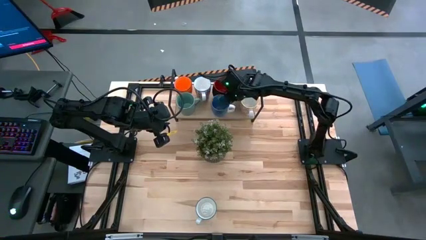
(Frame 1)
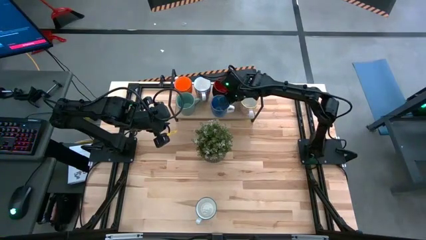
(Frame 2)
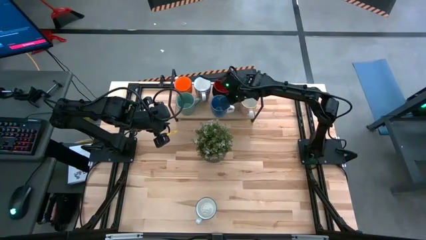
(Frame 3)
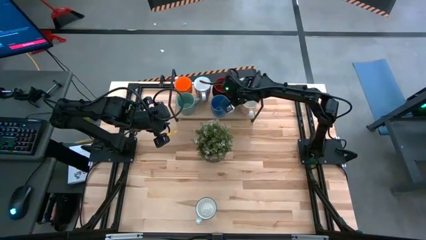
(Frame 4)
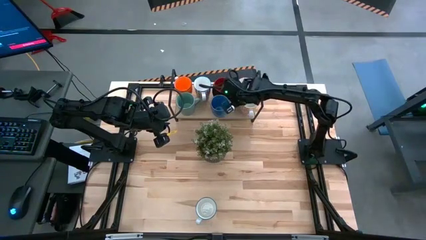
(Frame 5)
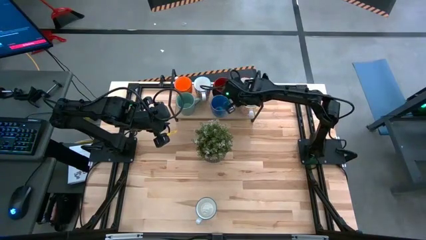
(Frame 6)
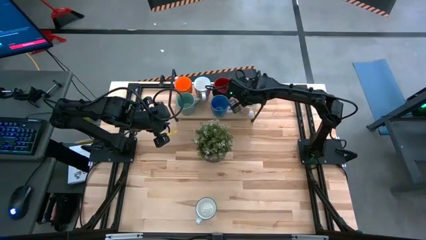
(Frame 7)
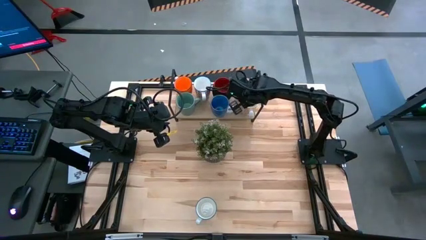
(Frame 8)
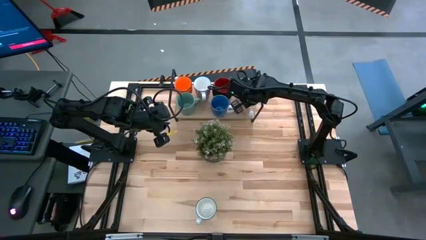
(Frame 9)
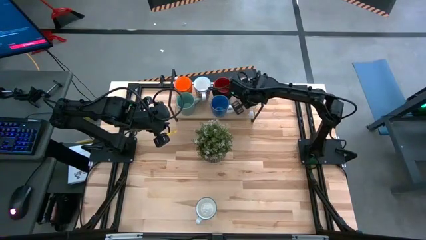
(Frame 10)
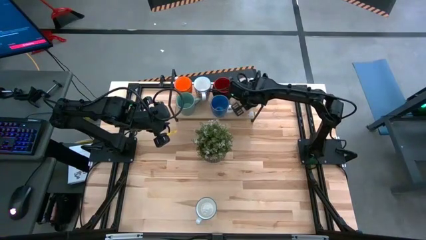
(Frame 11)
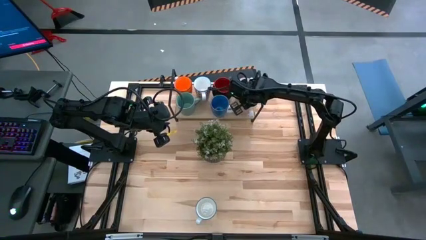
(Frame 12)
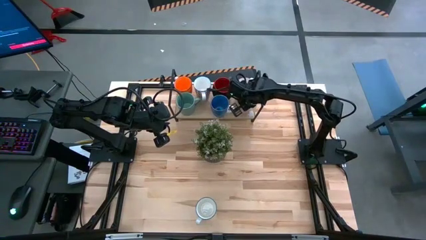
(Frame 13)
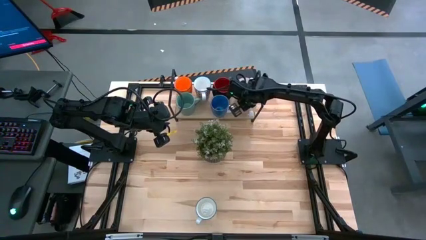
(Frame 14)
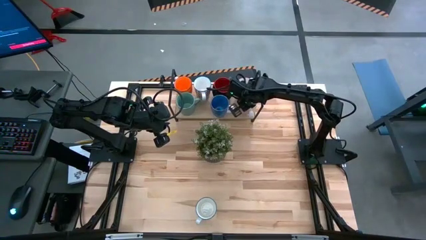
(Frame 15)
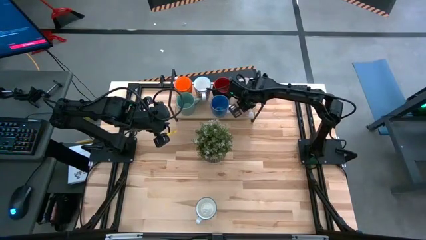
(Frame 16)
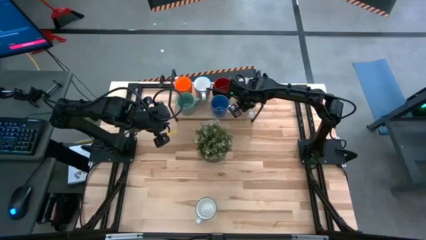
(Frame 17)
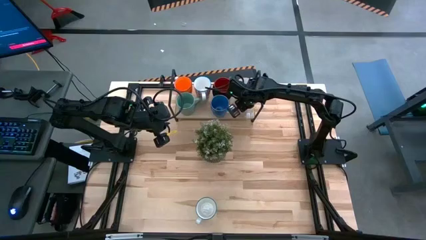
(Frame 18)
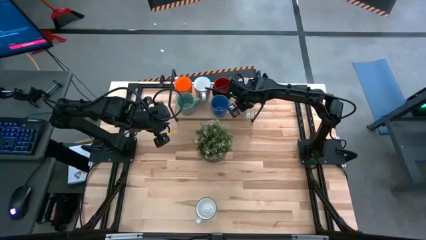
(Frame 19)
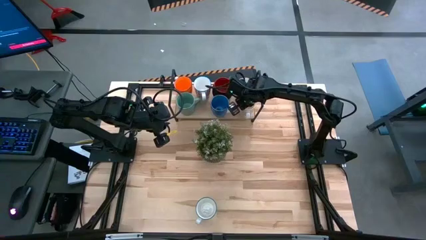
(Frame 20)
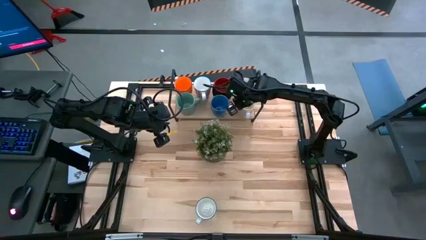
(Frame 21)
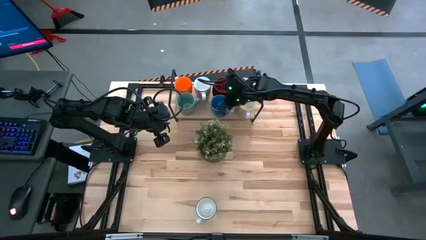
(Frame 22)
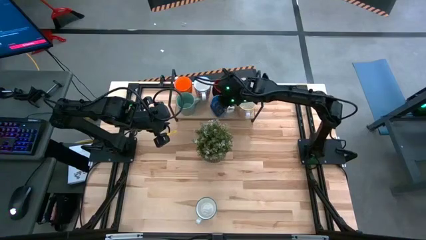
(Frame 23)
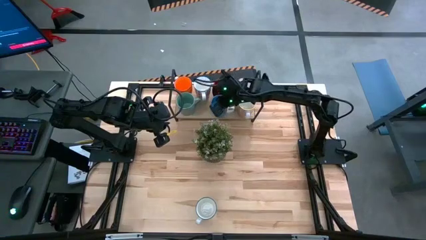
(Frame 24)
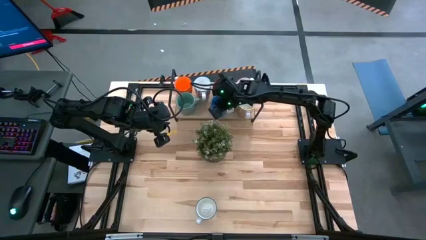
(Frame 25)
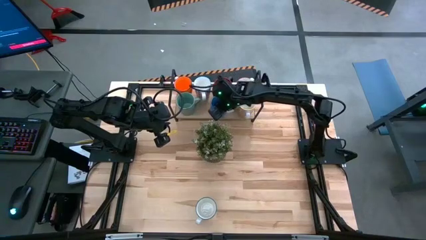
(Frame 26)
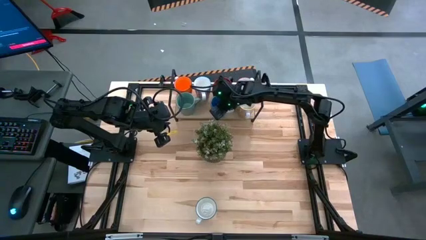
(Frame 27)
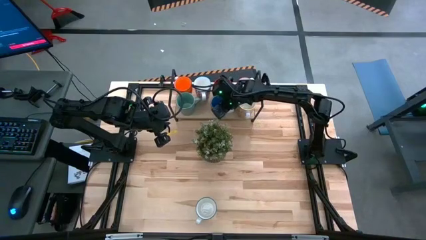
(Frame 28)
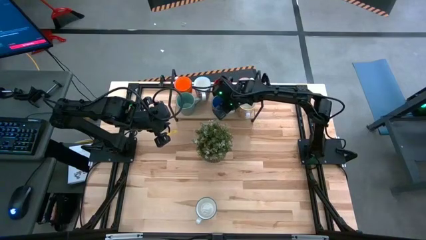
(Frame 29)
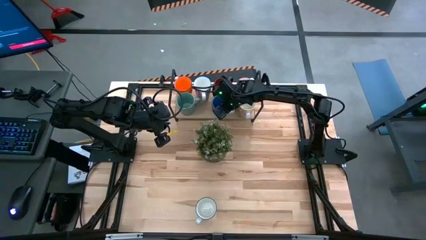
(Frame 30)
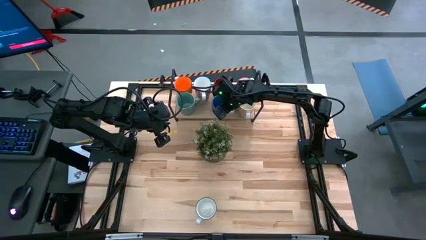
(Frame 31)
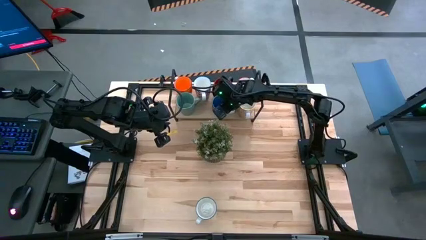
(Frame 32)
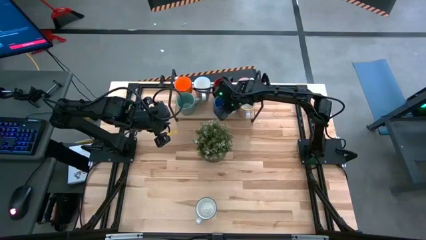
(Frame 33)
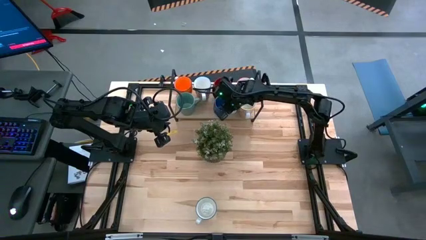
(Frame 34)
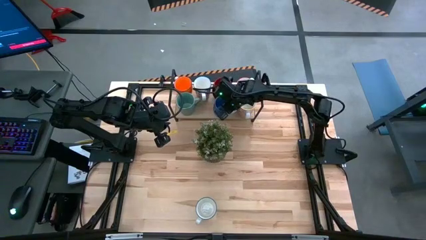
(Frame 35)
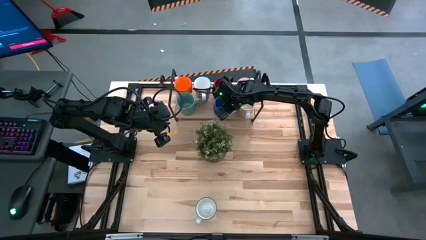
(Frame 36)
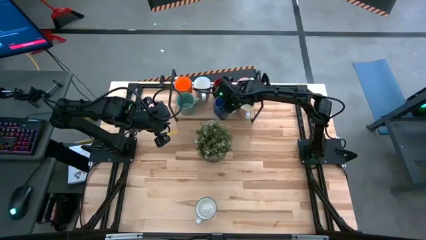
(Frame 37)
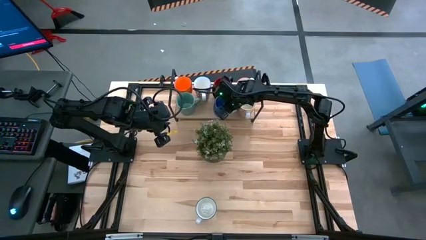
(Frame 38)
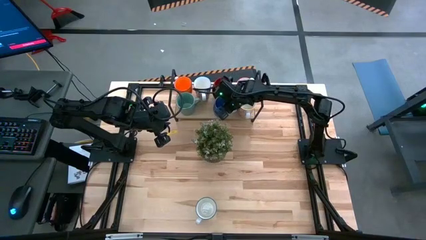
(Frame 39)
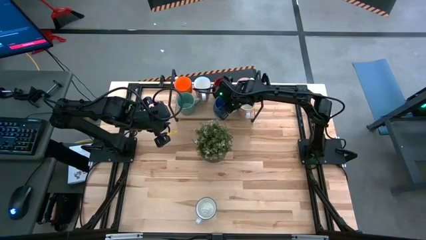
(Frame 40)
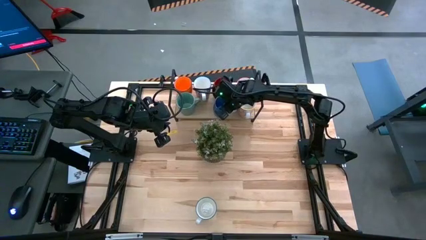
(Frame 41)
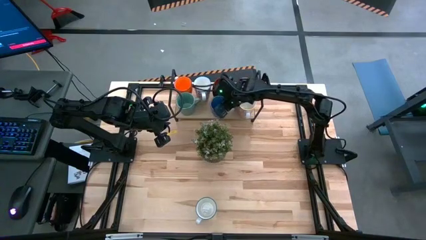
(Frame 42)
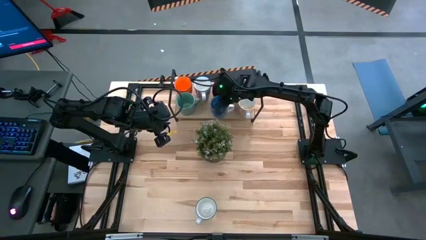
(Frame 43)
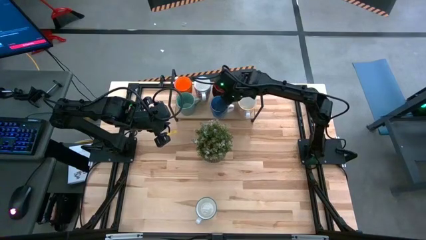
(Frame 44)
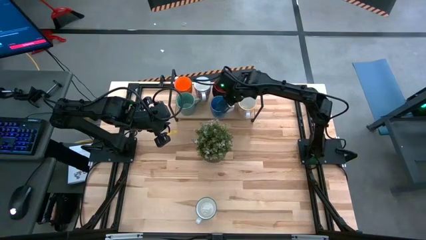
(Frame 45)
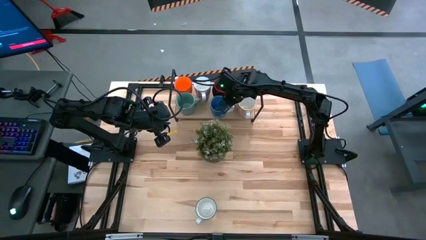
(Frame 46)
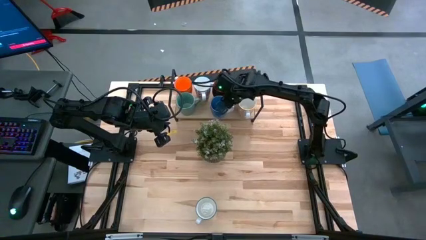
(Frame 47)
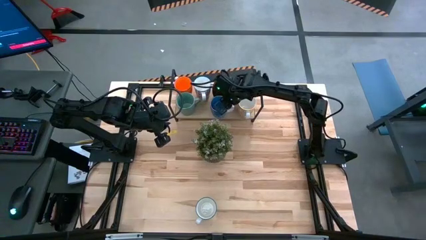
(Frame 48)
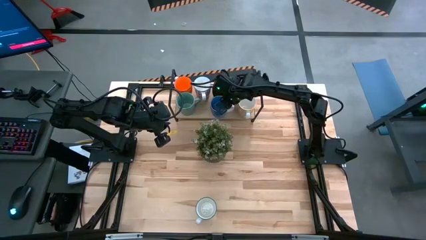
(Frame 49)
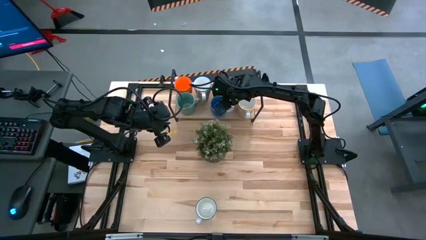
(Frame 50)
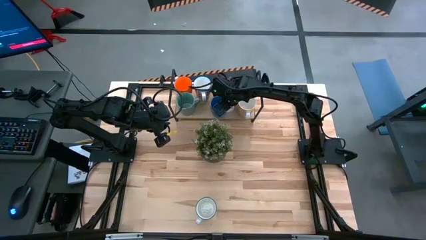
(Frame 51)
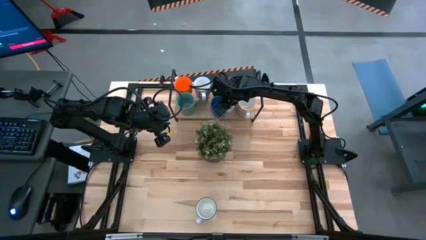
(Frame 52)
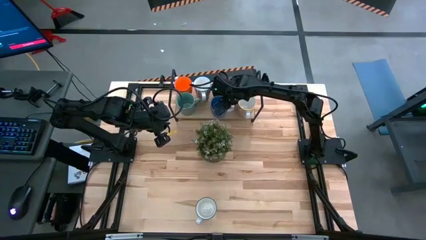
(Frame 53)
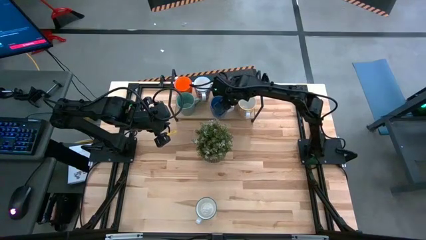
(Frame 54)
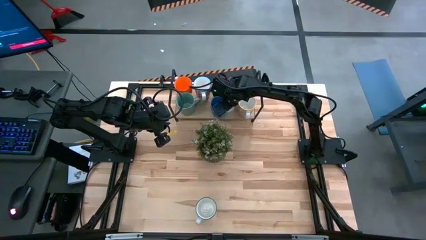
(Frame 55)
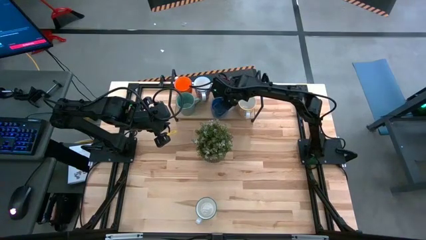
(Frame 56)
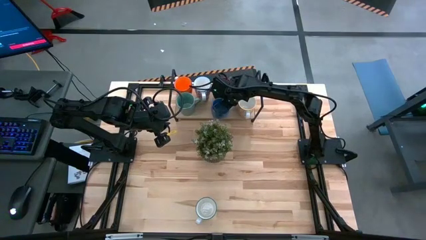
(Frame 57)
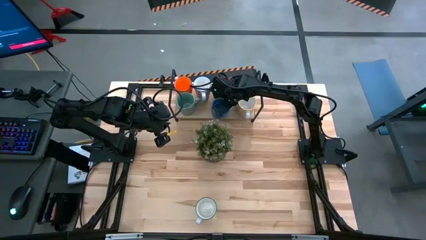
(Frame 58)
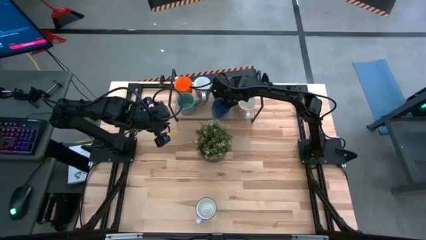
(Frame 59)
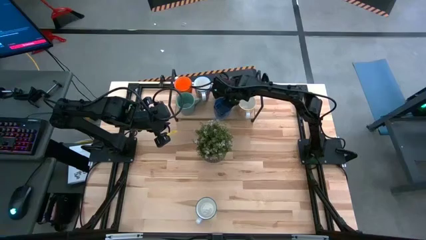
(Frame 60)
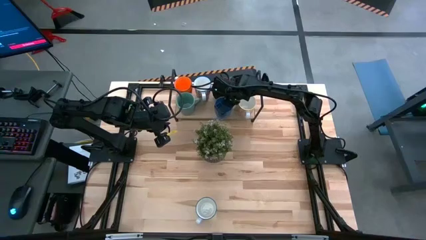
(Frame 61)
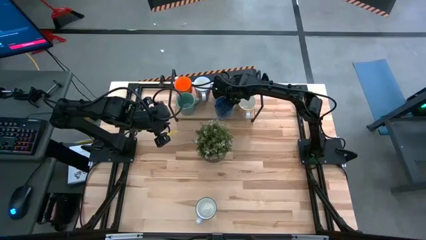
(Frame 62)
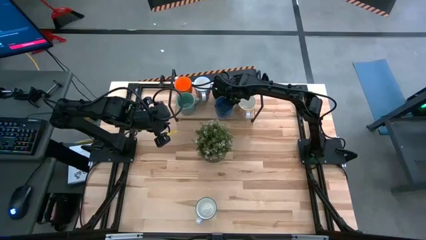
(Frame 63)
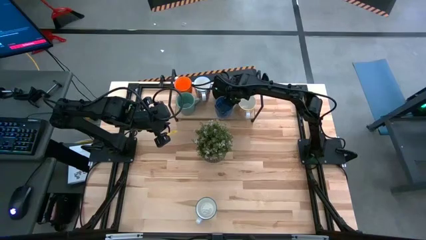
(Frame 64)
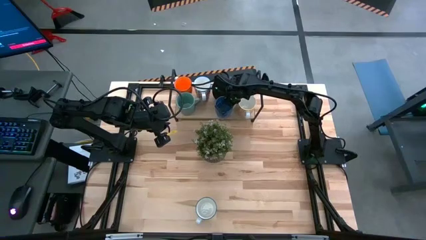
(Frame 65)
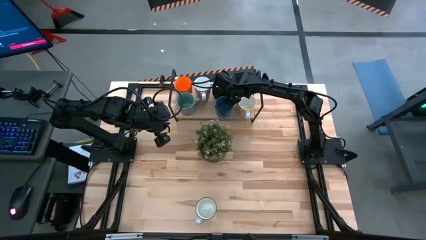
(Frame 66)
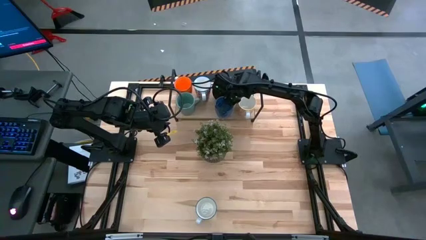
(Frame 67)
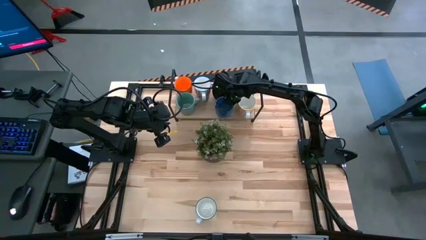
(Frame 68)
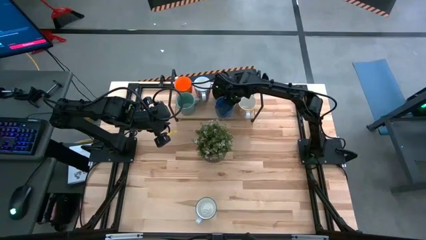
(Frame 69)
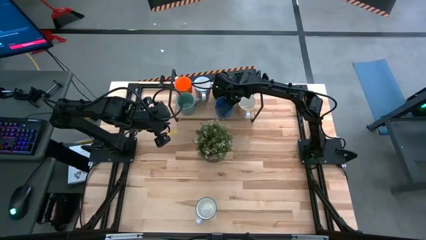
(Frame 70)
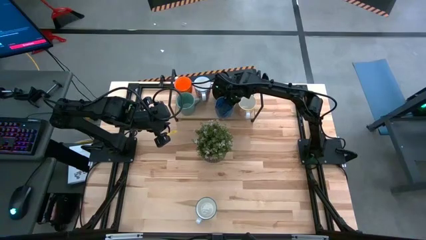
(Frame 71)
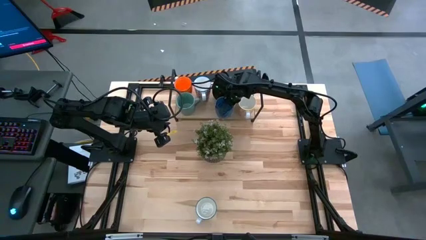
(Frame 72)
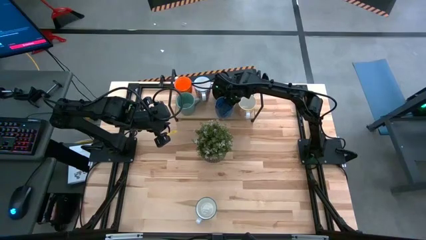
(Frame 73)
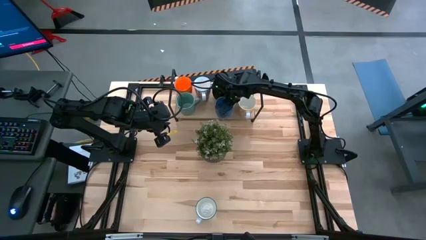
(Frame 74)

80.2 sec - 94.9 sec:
Task: Place coffee mugs
Adjust the mugs on the shelf

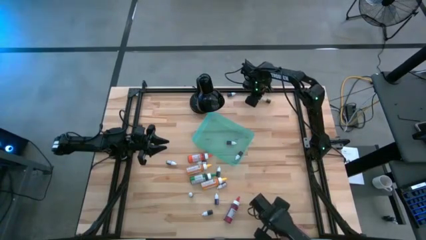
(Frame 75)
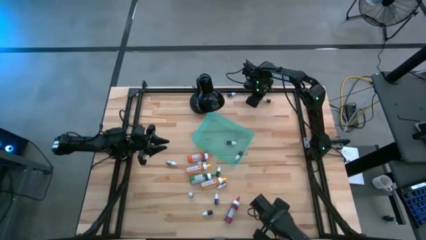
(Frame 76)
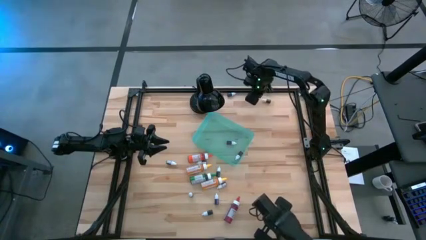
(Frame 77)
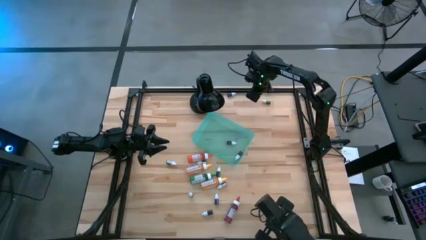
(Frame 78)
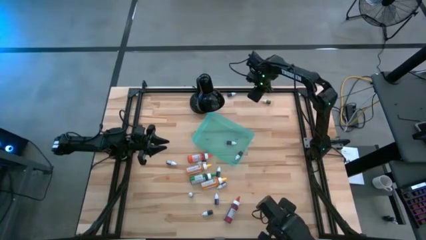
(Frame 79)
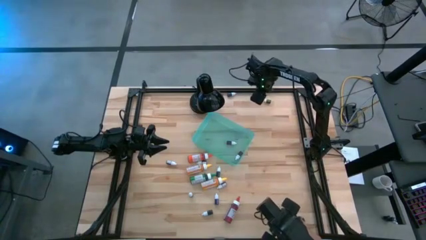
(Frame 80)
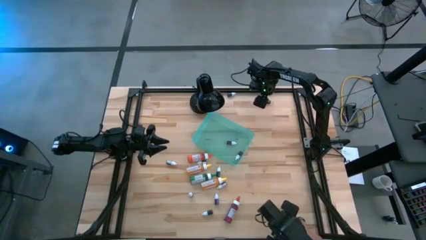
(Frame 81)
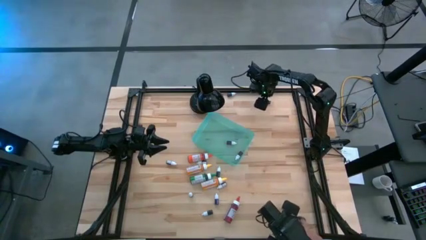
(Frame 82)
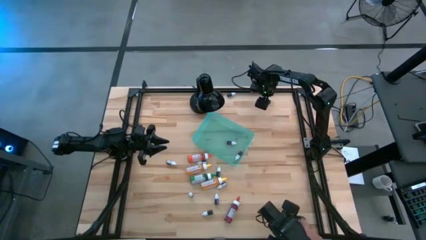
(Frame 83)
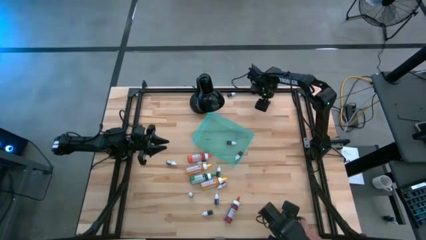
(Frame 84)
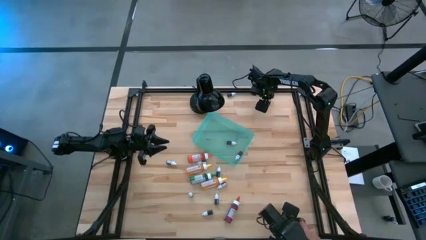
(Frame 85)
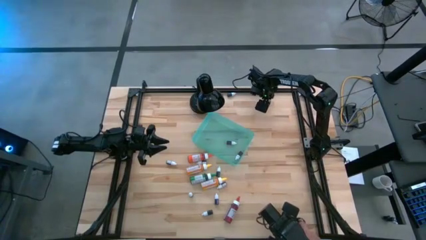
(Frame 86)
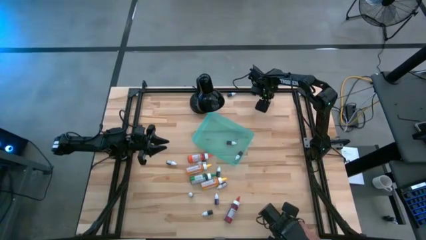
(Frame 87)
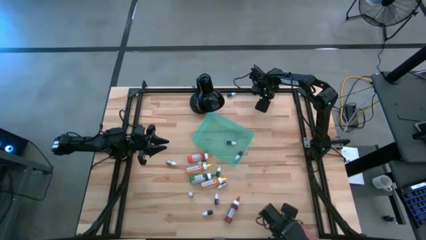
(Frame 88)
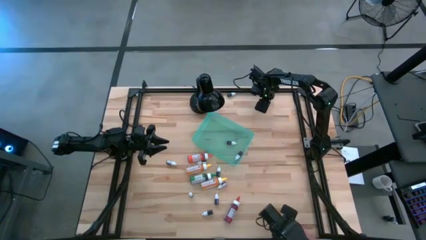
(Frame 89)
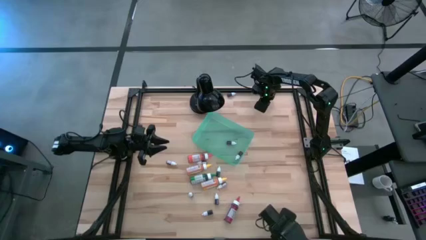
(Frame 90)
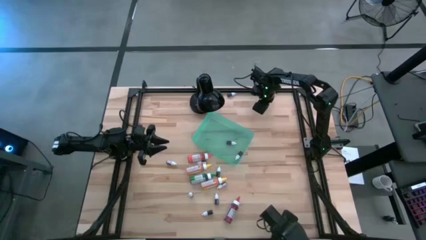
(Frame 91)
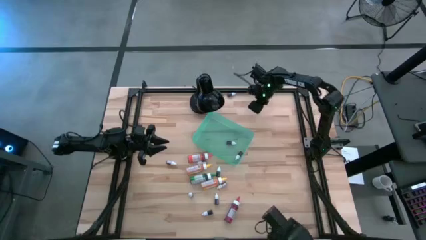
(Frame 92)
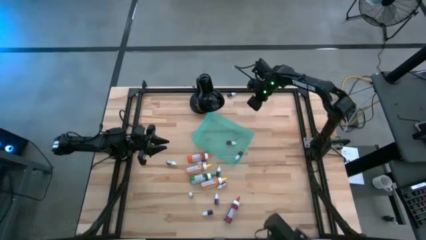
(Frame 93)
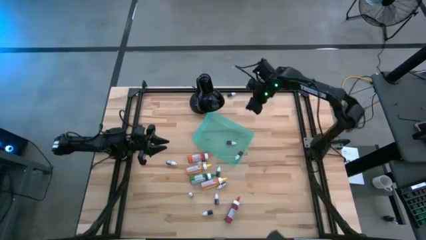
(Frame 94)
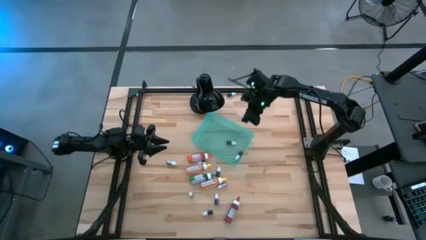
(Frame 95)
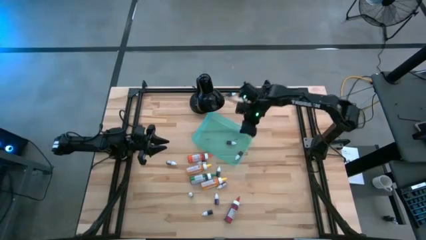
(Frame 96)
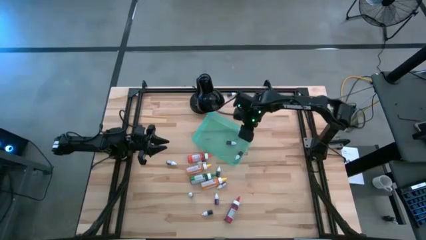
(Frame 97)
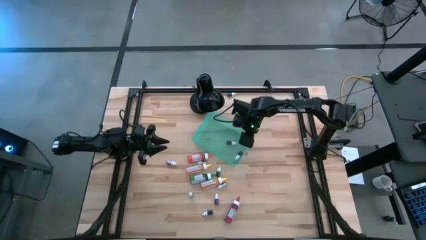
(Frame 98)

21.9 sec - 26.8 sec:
Task: Pick & Place food coloring
Put the small green food coloring bottle into the green bin
